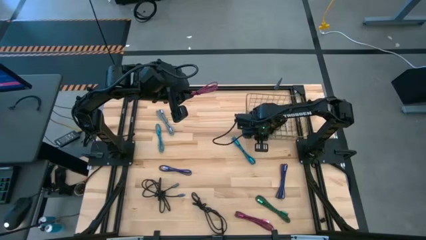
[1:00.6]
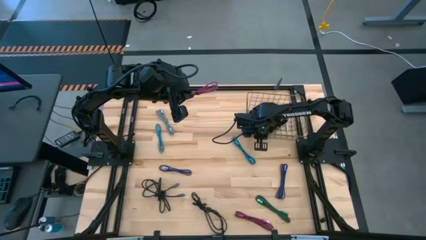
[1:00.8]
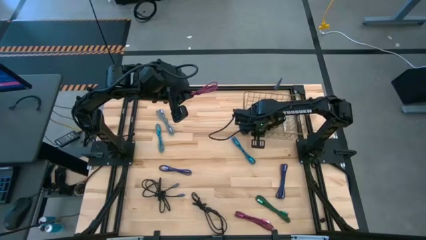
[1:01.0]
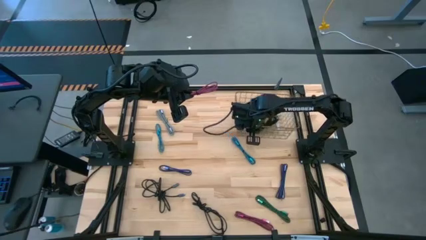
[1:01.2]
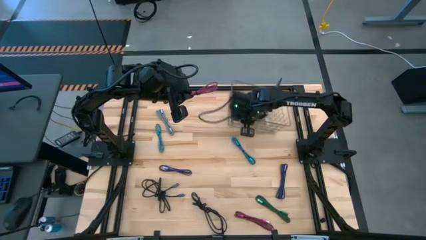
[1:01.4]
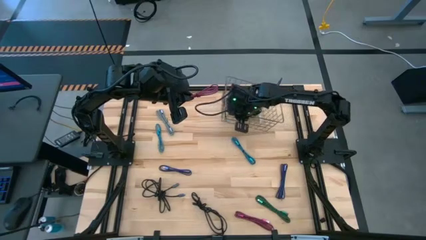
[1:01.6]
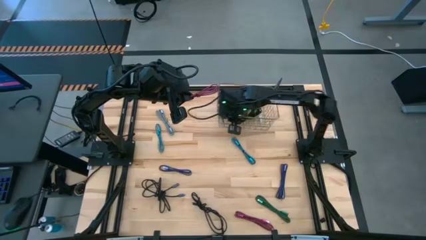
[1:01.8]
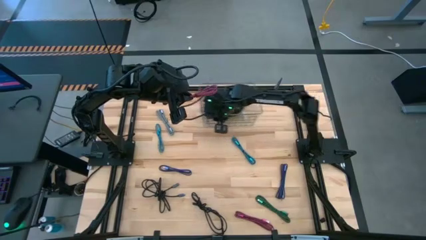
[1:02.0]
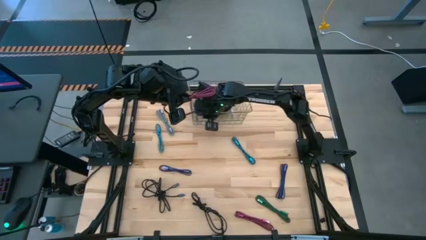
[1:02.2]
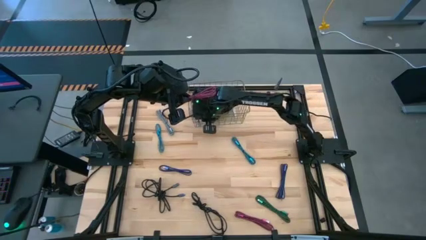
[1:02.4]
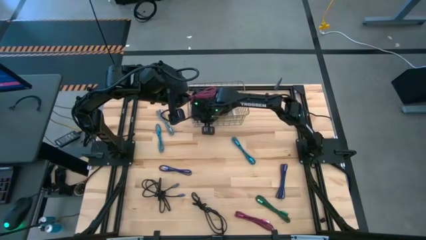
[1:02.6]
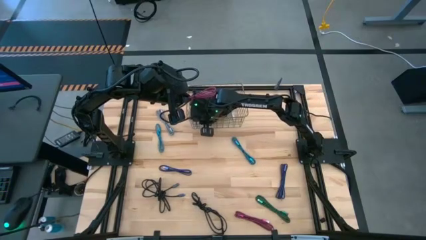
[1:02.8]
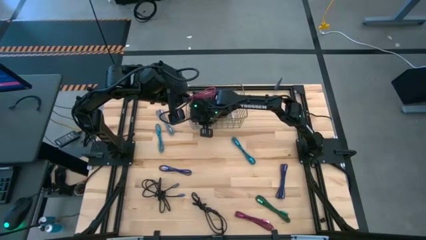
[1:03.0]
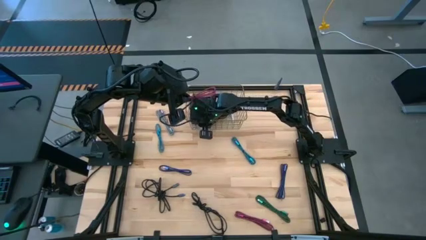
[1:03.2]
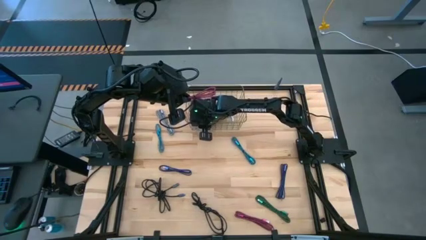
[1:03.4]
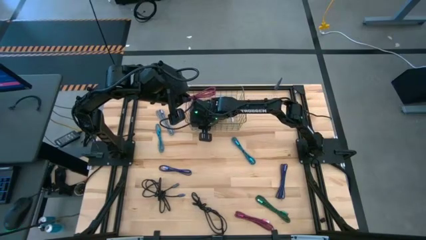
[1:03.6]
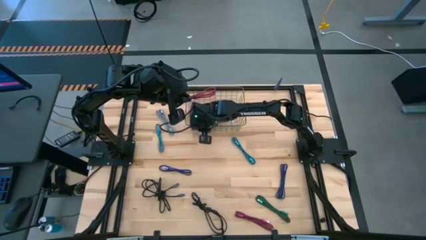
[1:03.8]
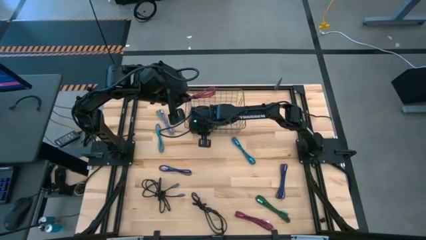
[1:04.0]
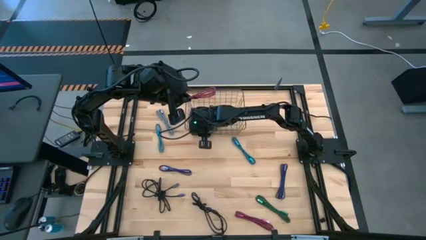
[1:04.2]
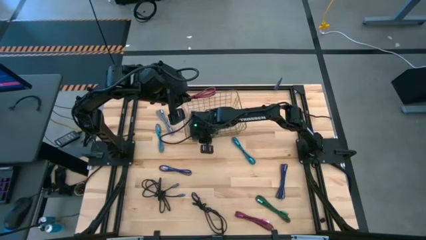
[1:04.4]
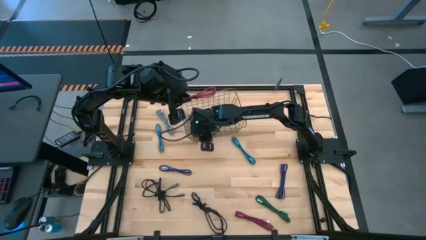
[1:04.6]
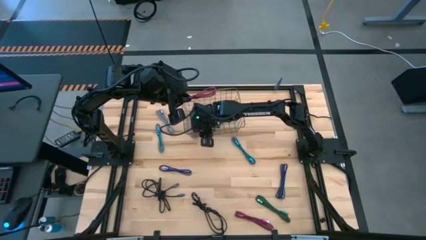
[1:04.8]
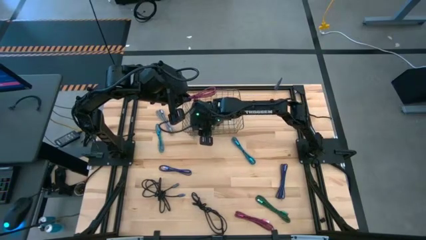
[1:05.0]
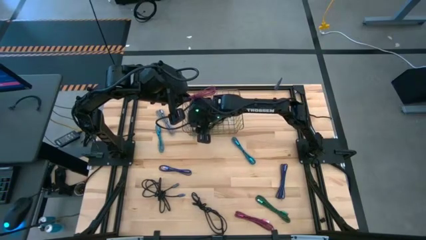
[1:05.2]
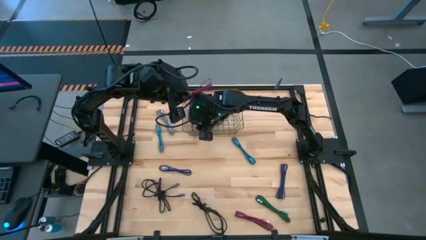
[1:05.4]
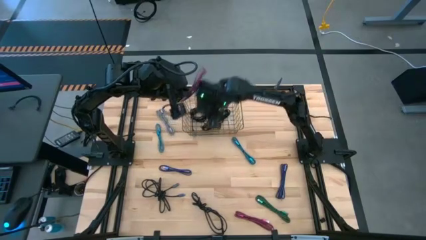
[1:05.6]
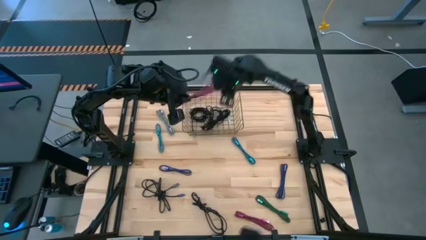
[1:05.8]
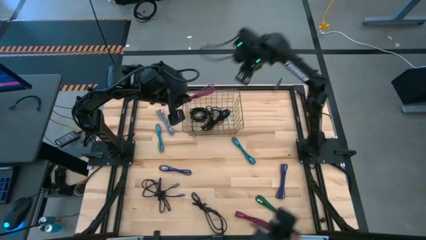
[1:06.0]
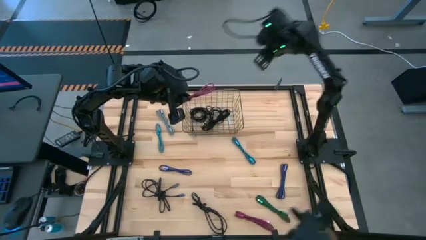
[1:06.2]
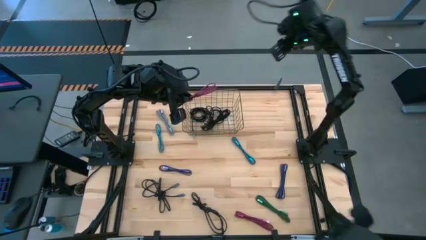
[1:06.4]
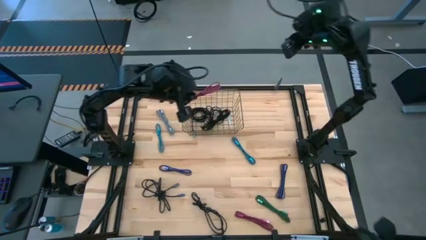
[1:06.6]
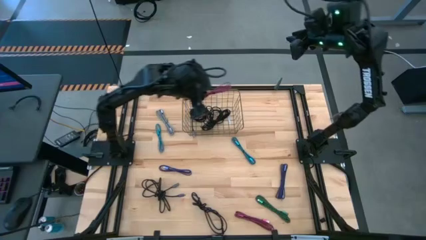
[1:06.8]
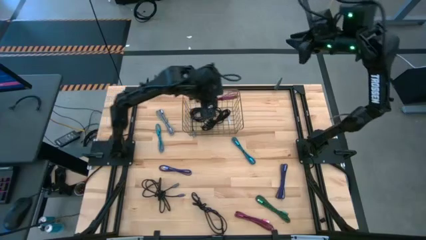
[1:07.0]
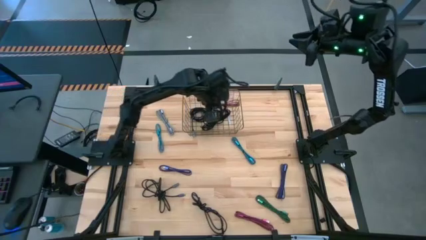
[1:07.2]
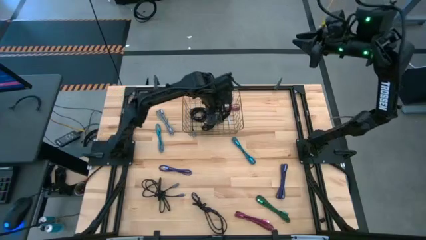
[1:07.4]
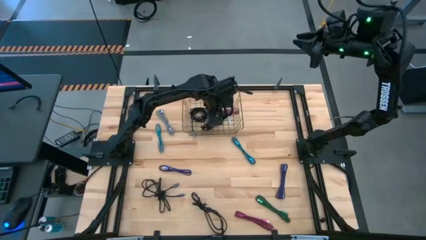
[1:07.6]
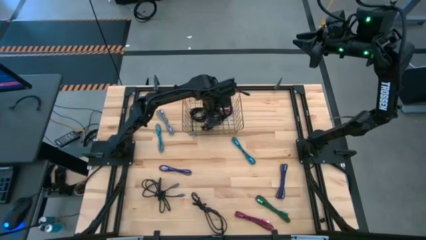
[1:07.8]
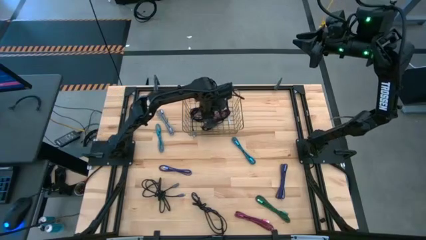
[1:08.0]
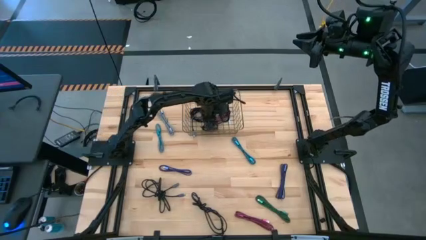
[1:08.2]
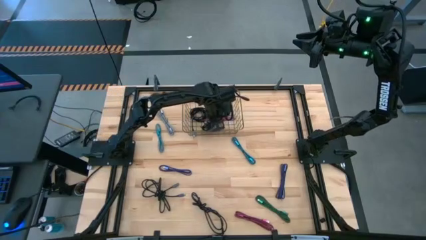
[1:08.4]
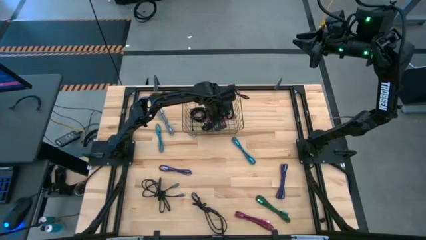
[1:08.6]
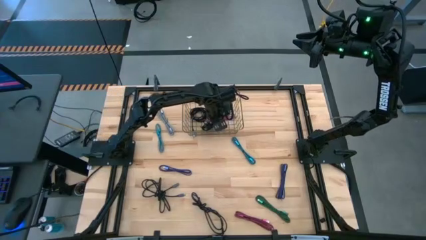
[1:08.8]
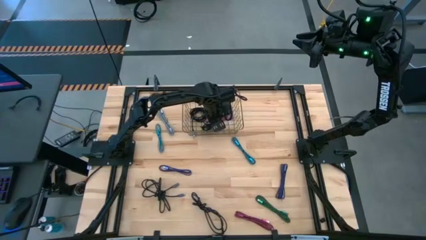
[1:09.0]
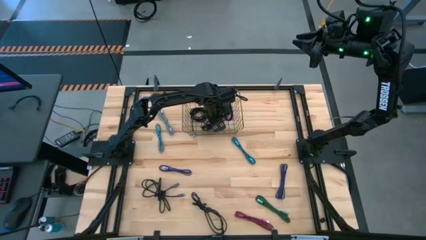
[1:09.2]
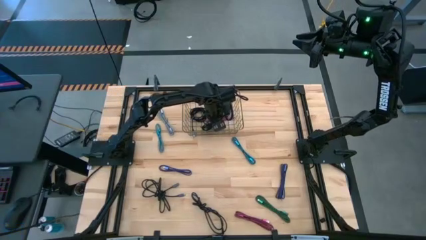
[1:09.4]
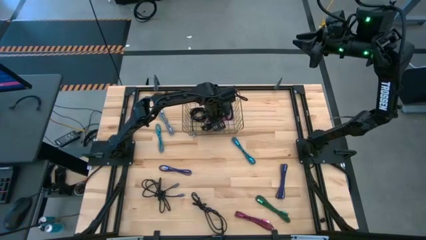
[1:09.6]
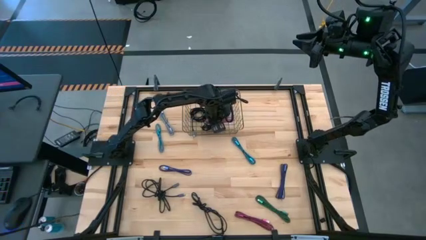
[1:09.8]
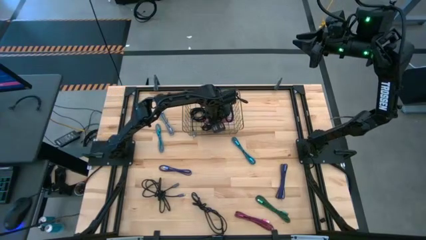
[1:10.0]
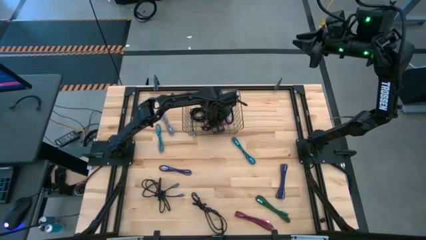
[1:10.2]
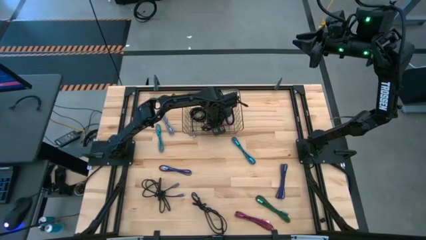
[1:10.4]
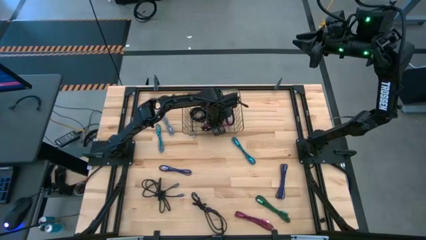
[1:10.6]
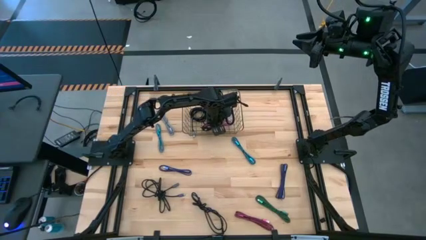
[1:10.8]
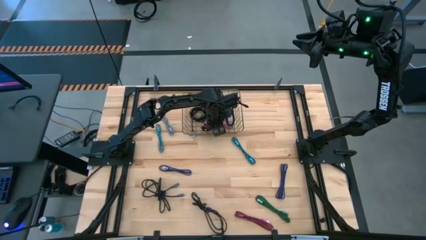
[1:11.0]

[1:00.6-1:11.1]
Task: Pick and place USB-C Cables
Put the pink charger cable into the wire basket
